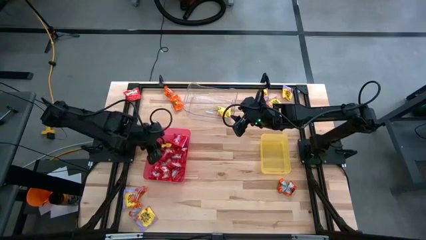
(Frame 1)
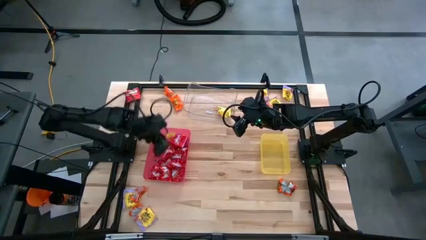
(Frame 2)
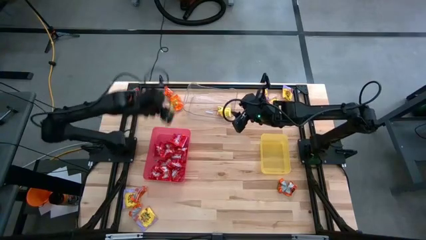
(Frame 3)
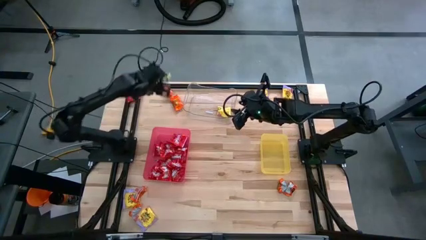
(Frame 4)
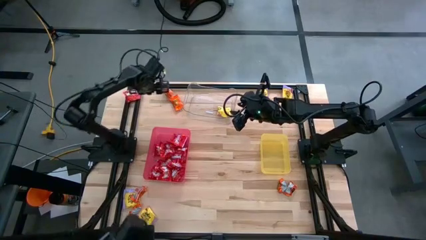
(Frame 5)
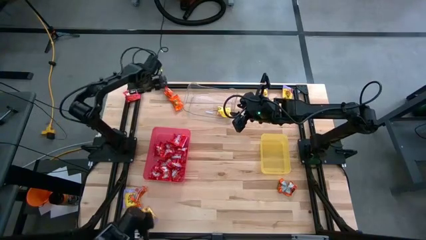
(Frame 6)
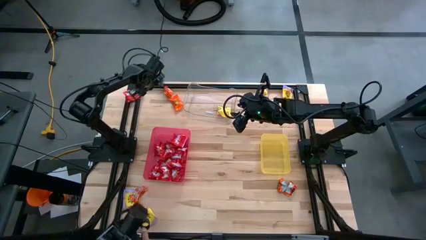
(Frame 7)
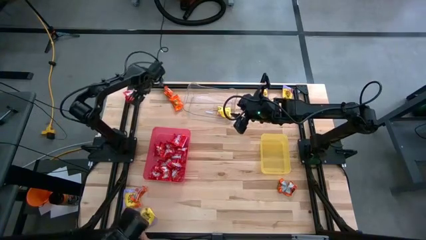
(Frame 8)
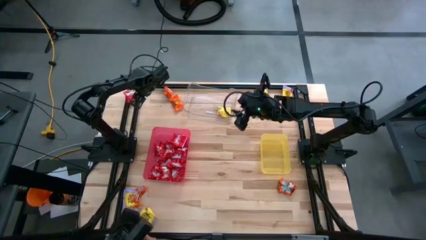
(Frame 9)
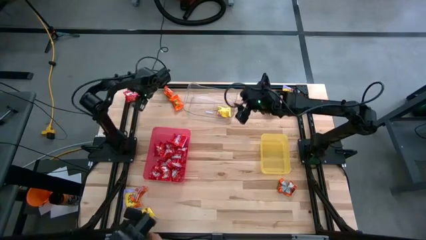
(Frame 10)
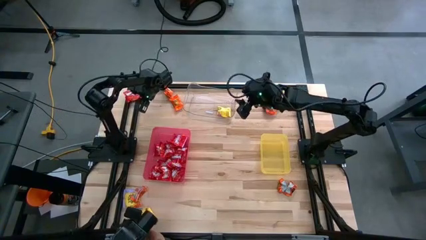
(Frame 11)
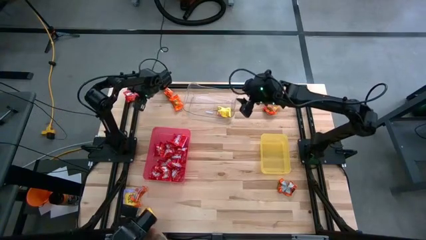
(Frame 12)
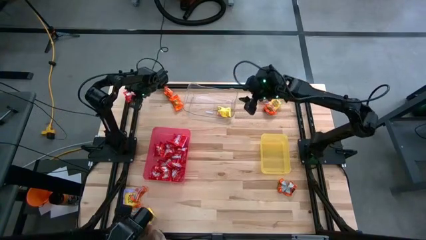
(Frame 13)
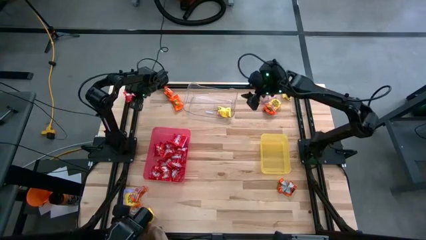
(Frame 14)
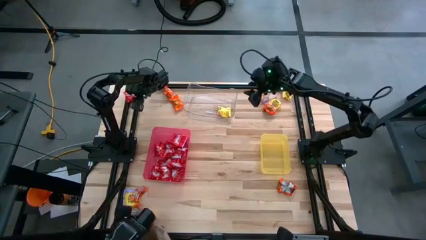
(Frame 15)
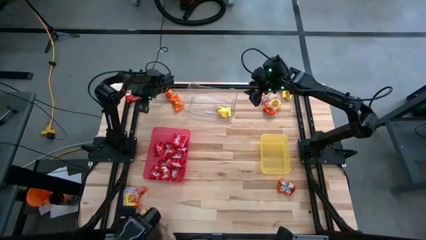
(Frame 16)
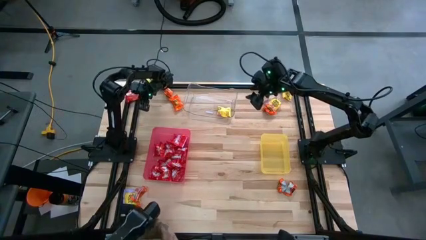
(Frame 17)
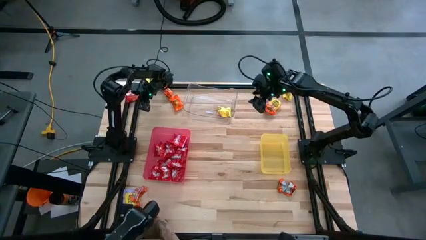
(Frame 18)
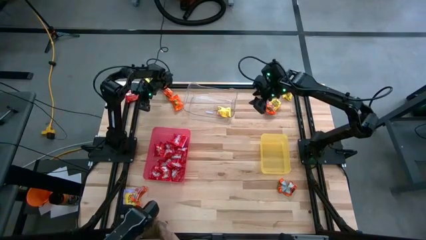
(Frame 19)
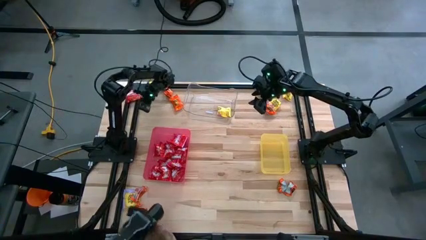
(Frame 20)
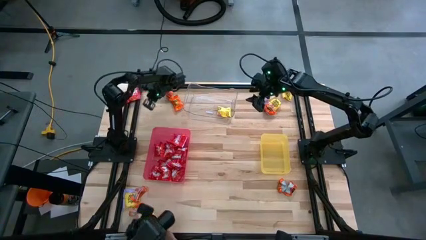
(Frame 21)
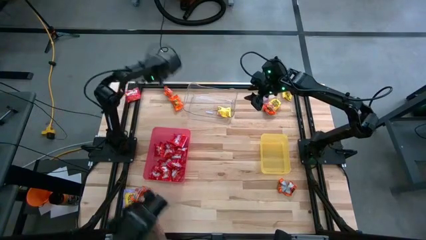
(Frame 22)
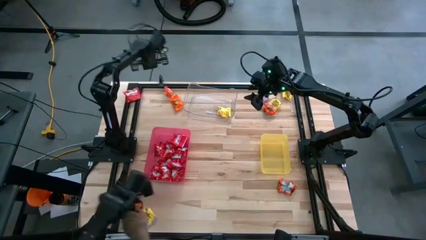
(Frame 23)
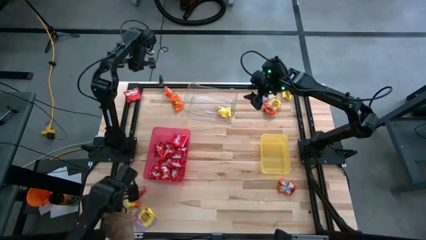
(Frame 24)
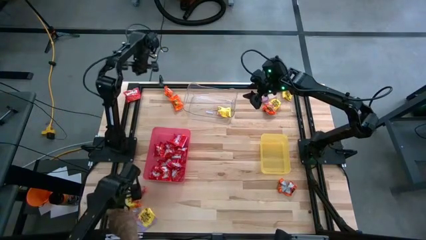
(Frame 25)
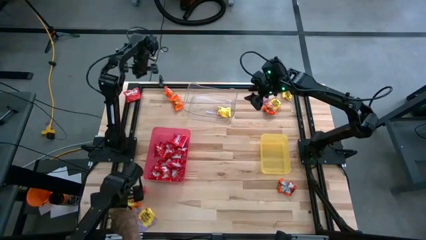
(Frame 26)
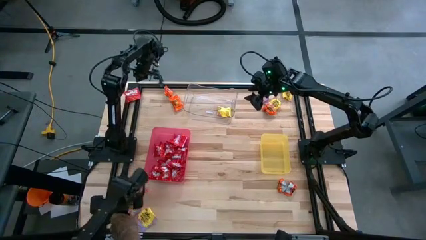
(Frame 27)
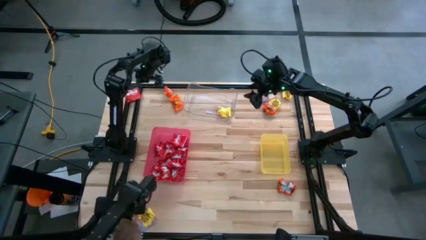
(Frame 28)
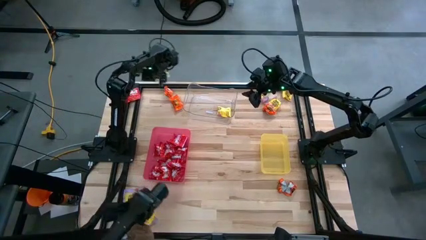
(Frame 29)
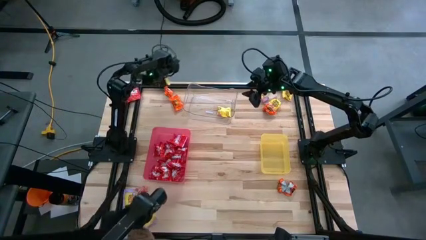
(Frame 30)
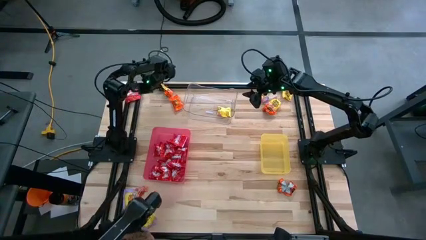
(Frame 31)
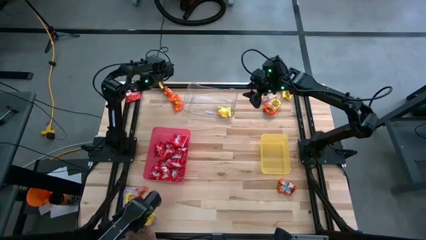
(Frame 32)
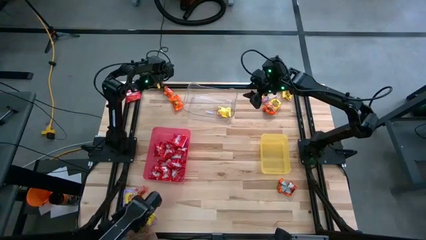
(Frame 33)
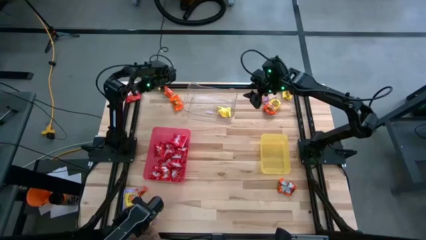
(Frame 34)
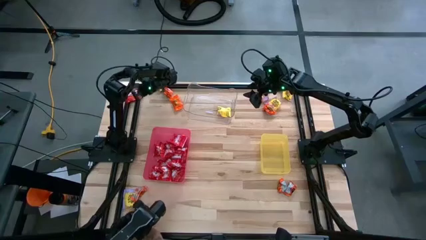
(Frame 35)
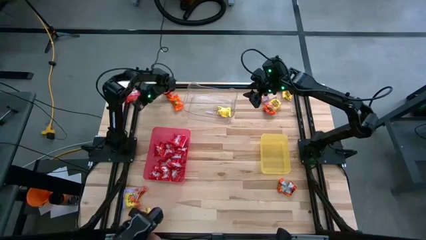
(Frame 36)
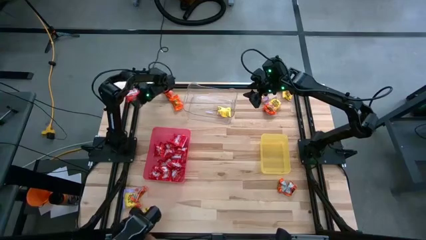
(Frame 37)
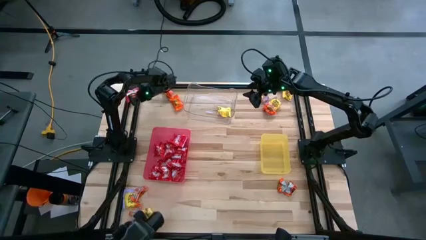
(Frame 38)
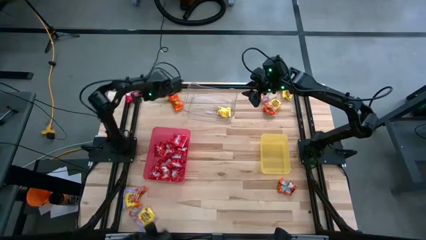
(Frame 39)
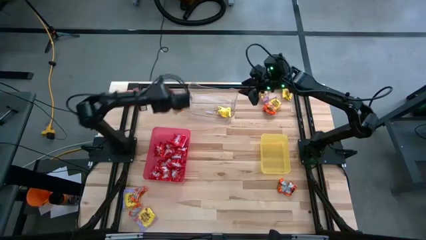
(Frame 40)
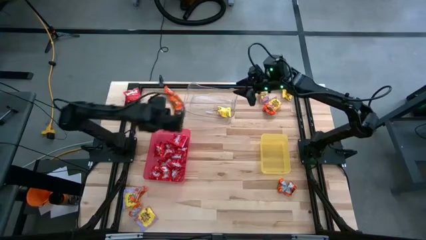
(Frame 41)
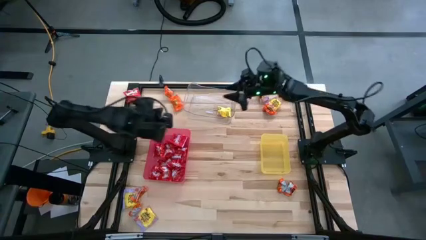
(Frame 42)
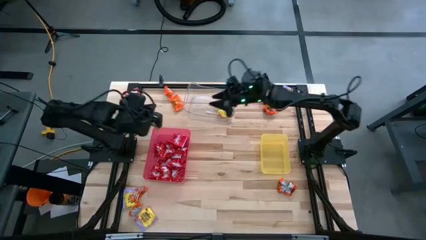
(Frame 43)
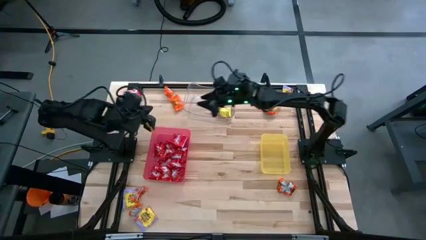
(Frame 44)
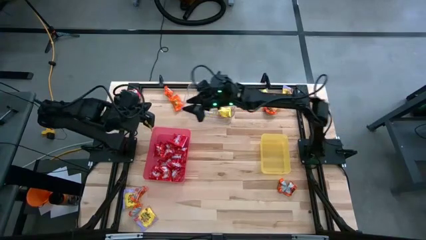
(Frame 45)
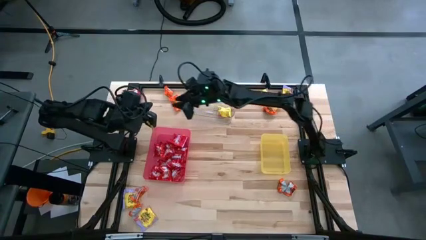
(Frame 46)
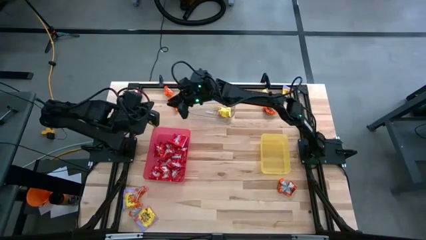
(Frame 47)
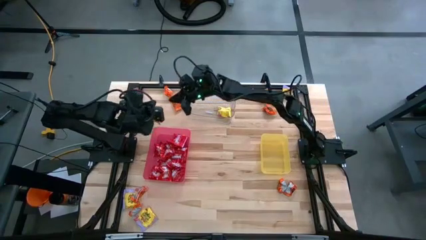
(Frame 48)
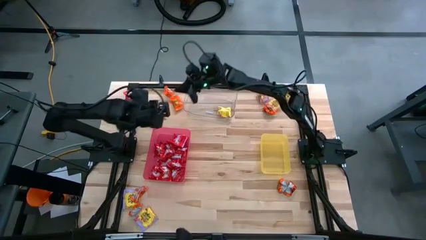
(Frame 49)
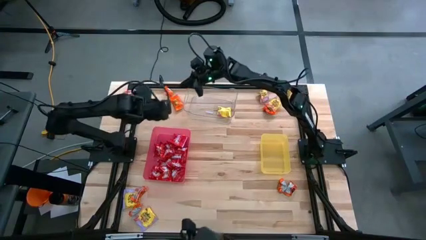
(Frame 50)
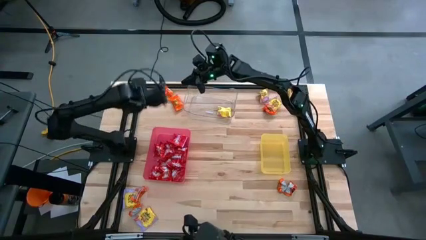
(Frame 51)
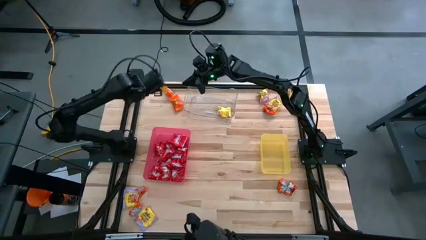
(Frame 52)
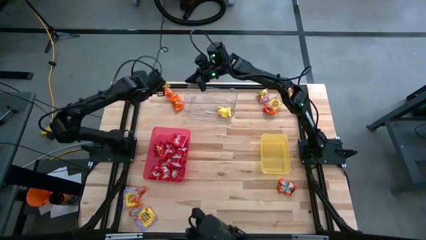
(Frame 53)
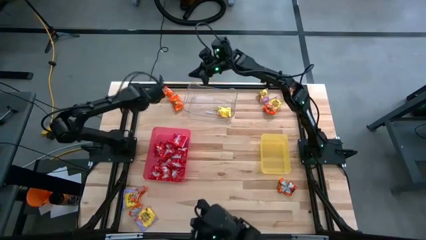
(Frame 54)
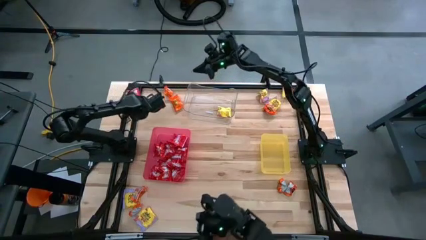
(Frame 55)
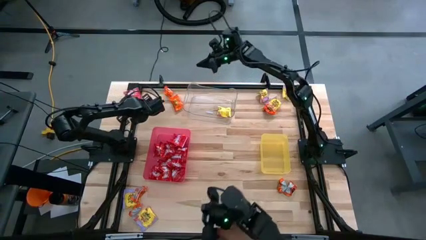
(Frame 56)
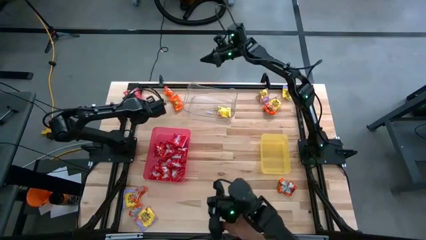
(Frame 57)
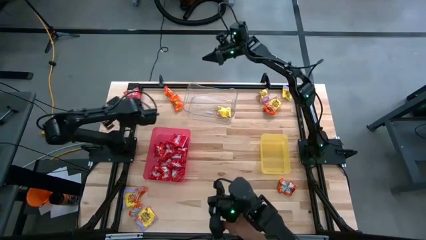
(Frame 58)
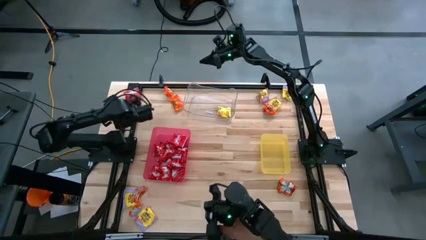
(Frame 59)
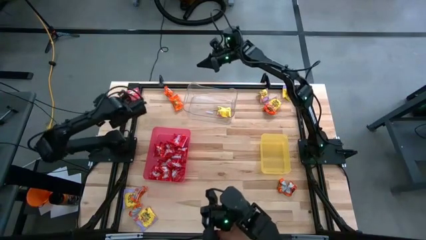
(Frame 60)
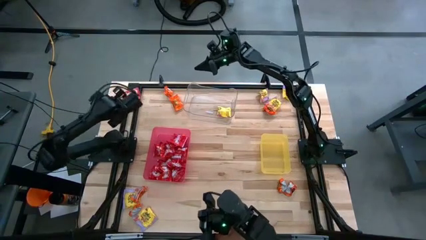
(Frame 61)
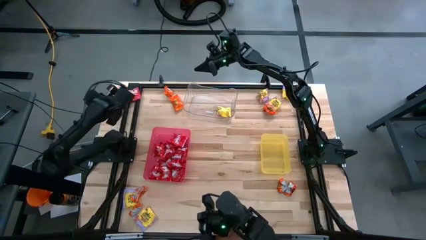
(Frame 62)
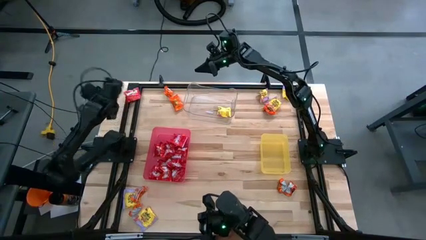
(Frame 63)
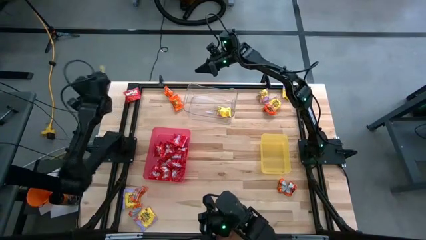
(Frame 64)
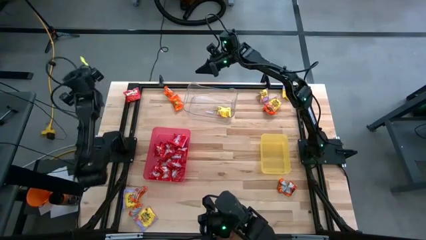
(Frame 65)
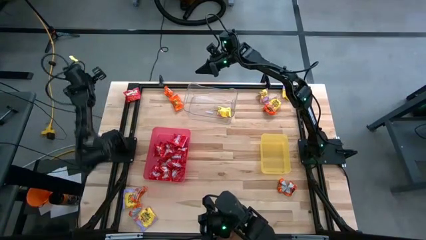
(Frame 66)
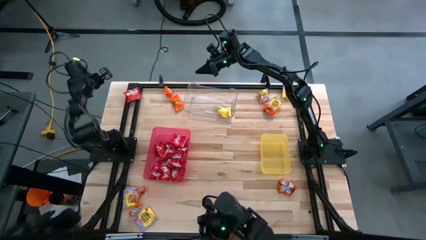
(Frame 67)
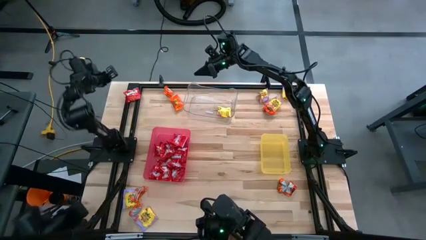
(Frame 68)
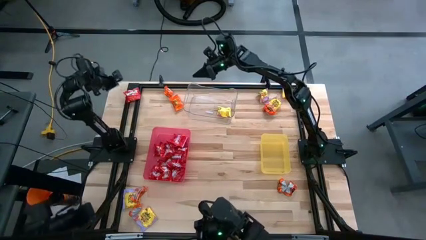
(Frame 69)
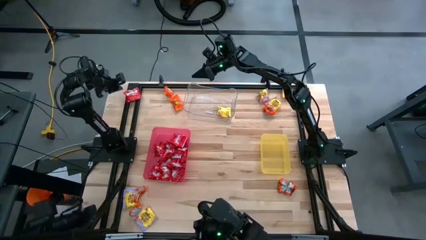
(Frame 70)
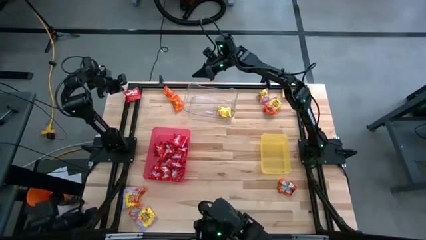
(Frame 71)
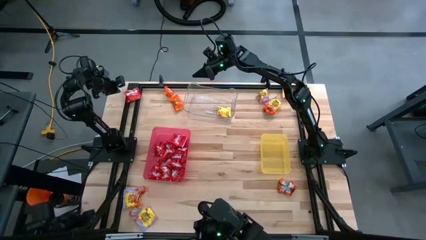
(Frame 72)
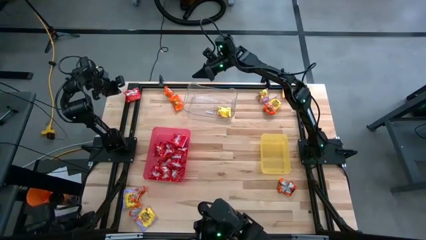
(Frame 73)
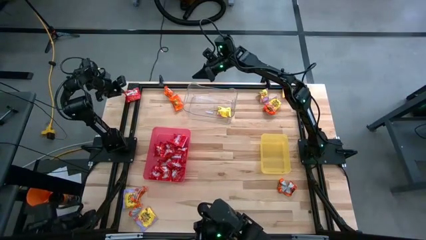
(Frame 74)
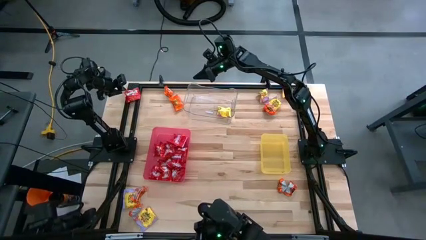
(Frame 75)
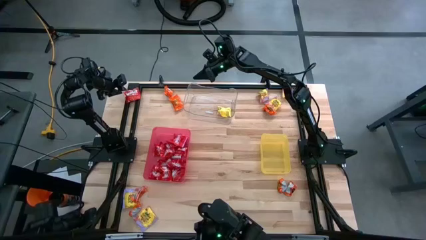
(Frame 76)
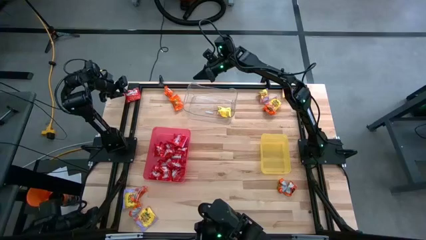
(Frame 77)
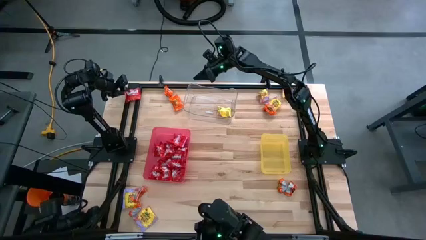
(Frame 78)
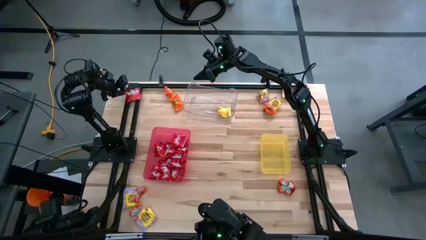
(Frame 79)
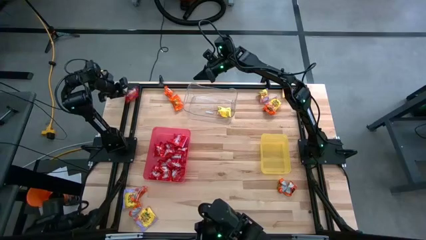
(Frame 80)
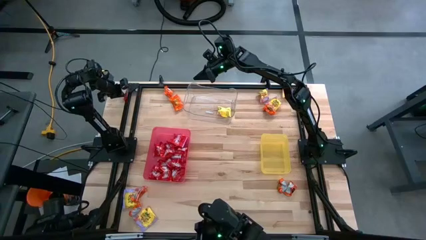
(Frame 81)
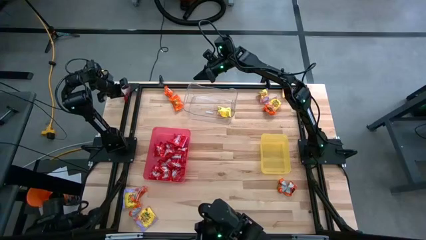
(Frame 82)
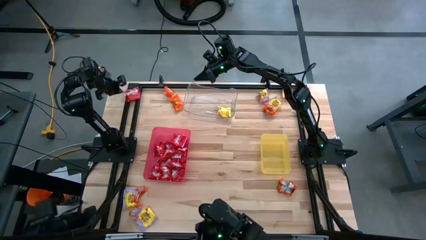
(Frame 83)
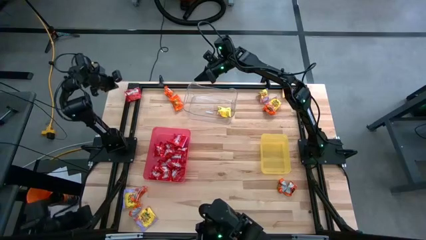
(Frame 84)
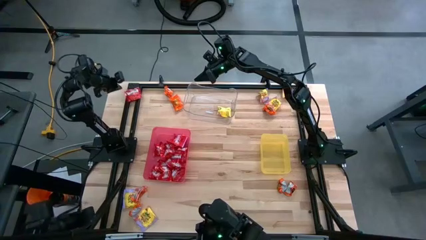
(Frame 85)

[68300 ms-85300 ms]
Task: Sort candy
Put the red candy into the red bin
